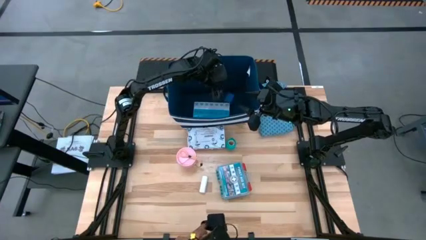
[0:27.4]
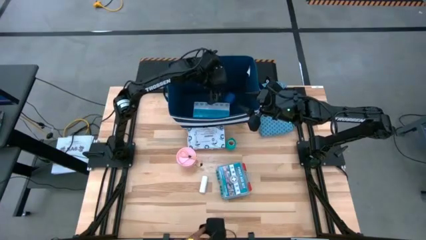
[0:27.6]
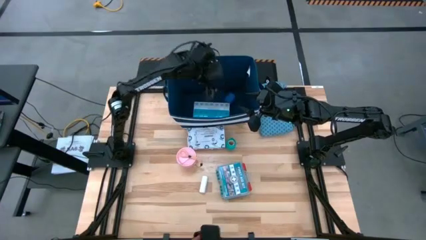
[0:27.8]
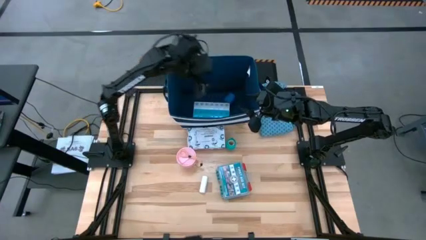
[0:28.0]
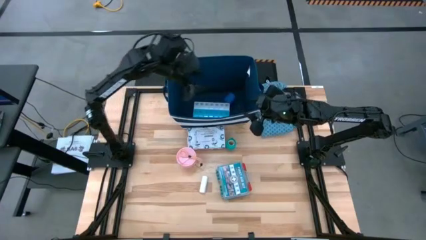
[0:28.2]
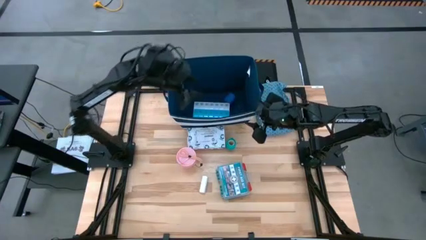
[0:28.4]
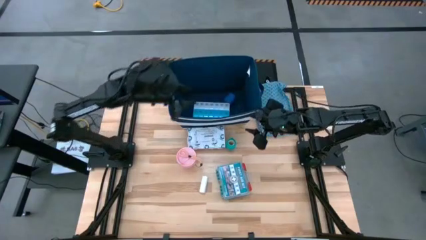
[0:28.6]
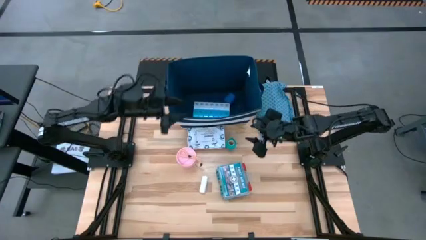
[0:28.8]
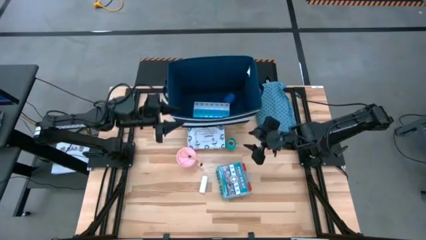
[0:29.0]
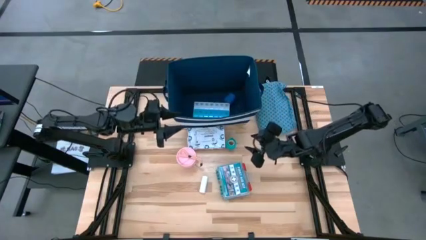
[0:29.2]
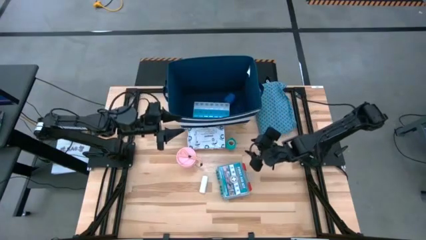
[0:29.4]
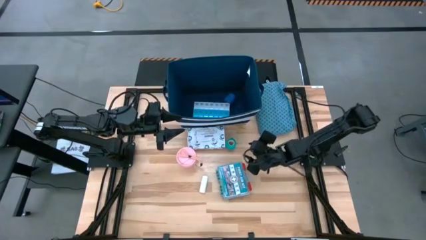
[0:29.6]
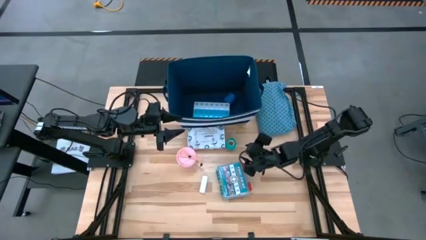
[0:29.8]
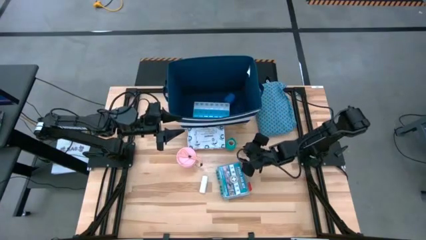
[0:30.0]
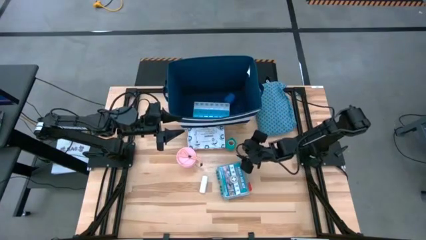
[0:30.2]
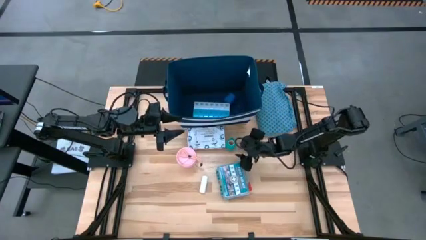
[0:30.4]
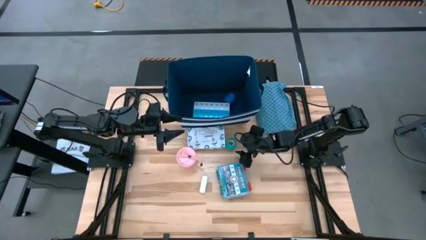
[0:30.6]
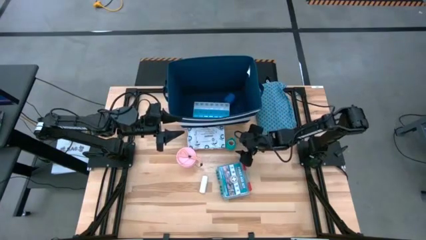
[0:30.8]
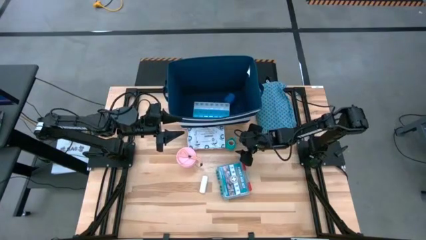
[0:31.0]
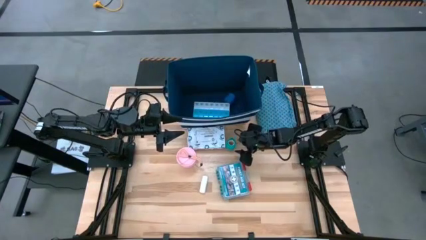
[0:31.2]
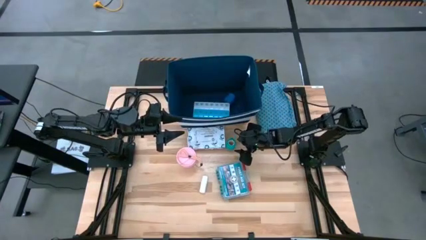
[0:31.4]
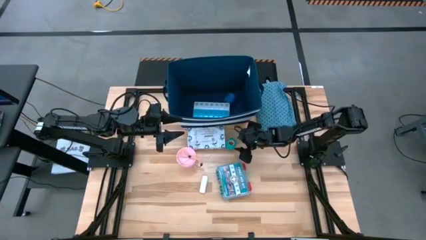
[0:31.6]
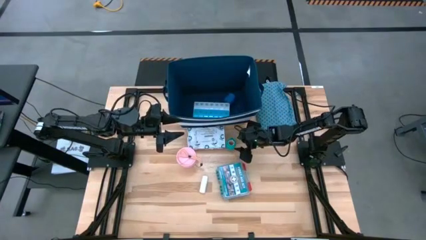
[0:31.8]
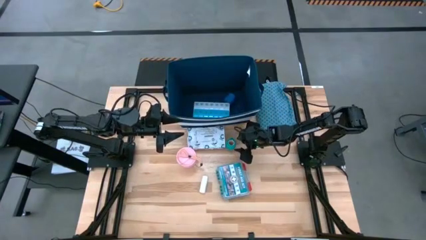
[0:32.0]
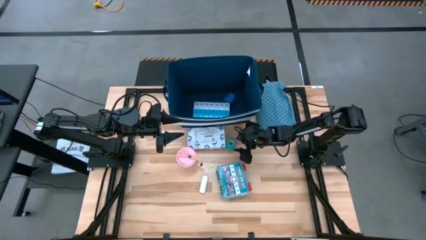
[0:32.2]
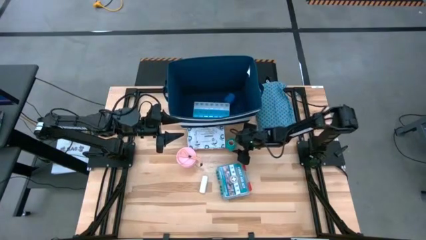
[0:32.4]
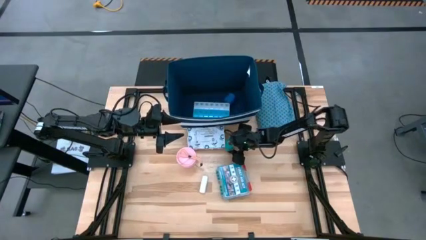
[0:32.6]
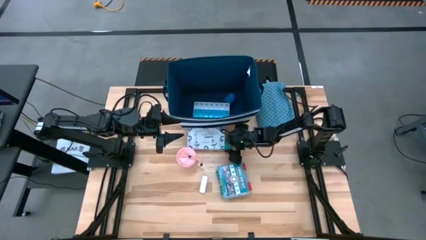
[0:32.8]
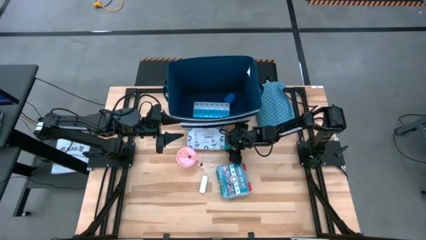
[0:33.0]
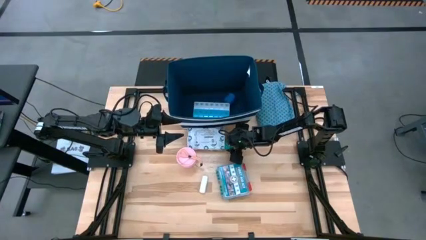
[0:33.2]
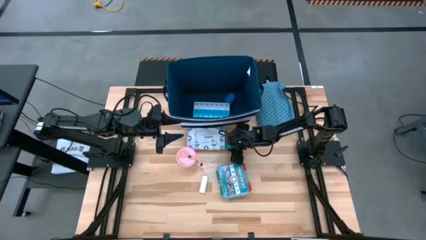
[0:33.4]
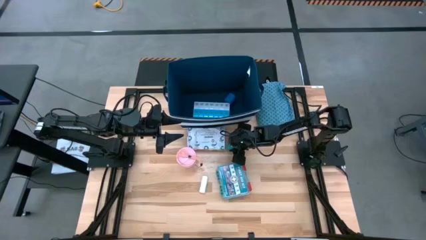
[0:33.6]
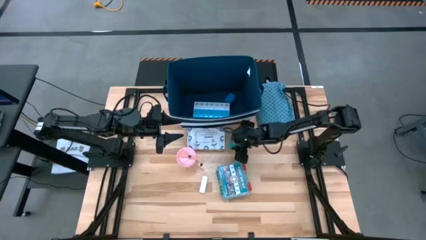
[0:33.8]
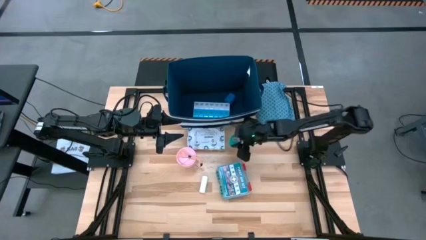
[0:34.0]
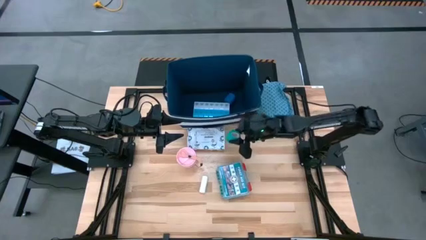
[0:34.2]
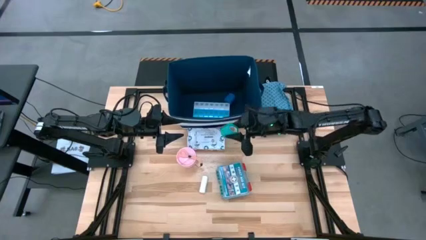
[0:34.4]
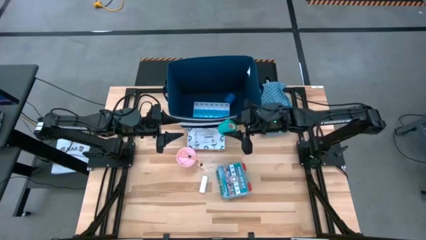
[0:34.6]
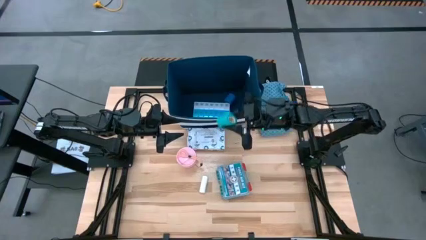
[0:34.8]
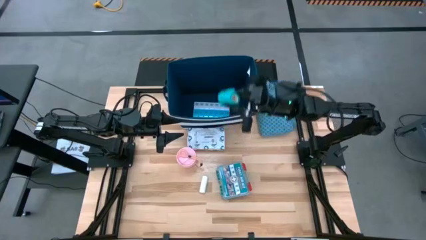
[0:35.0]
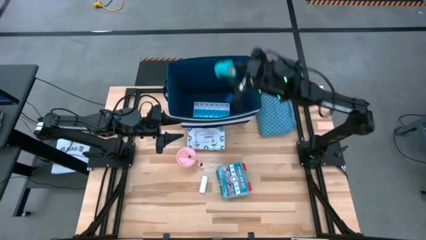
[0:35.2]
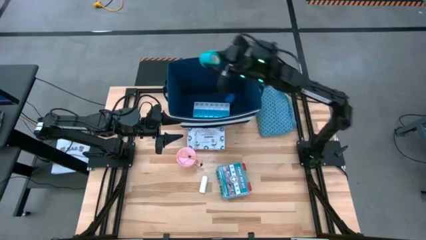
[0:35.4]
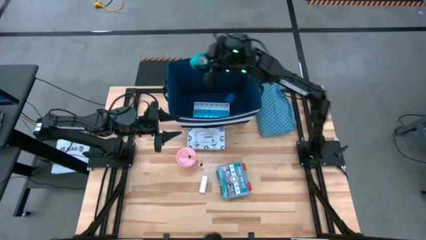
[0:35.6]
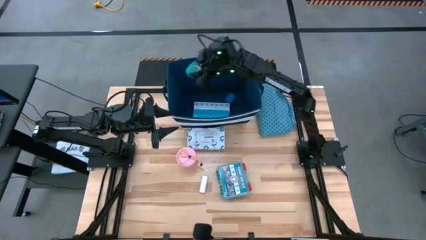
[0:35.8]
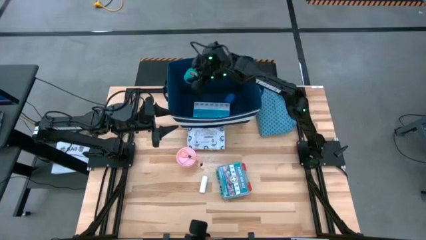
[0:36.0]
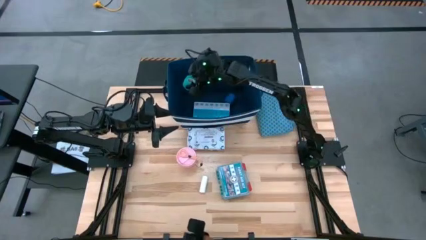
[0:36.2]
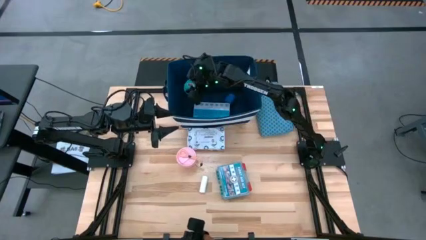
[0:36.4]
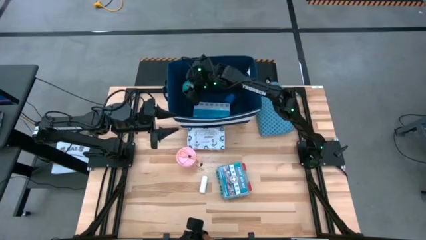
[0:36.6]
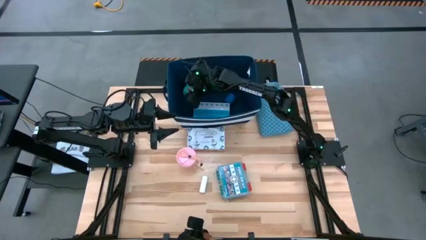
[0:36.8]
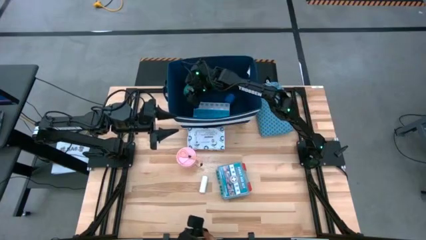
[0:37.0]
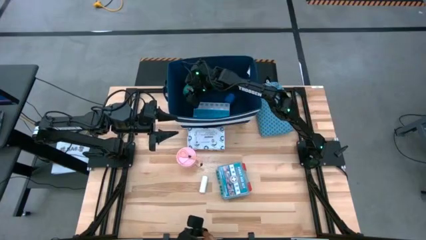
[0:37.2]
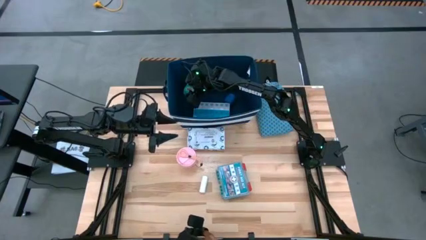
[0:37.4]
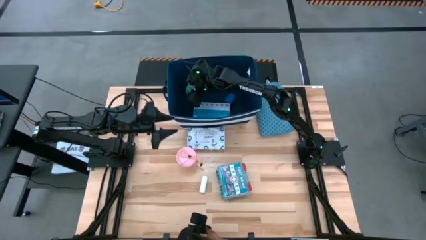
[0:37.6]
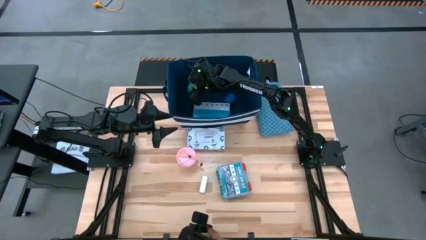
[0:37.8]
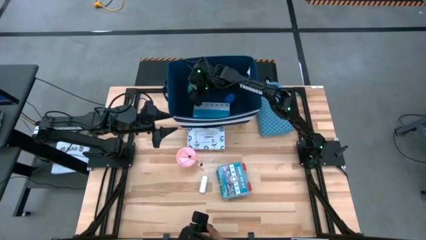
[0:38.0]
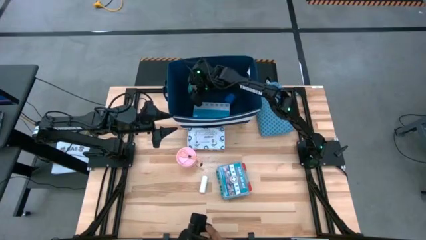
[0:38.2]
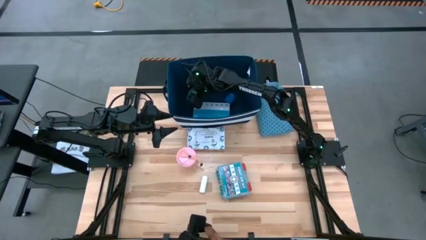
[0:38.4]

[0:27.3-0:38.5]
Task: Pick & place medical supplies in basket/bin
Put the green bandage into the blue bin

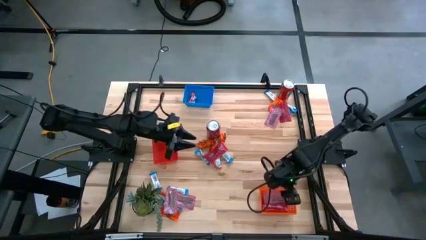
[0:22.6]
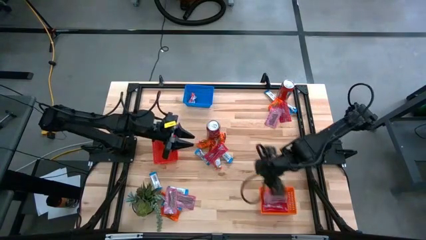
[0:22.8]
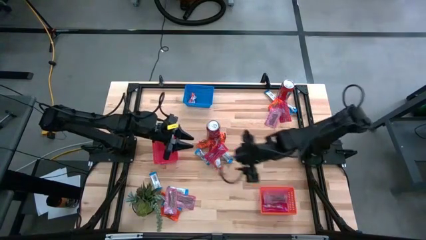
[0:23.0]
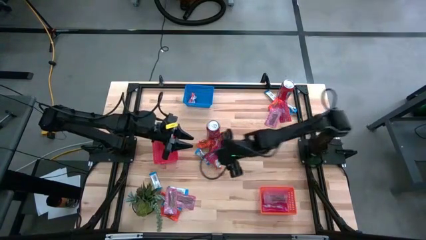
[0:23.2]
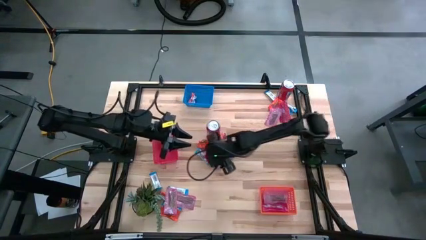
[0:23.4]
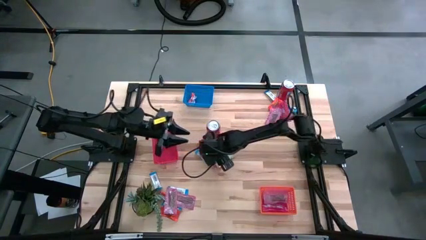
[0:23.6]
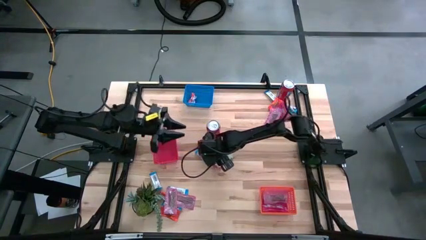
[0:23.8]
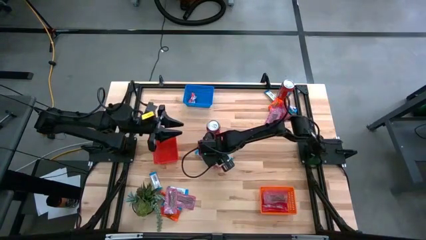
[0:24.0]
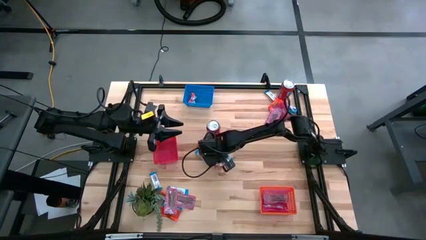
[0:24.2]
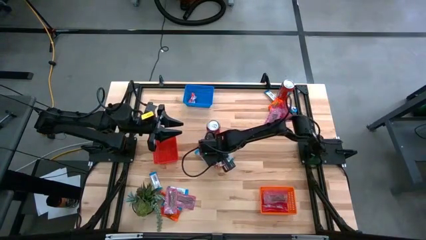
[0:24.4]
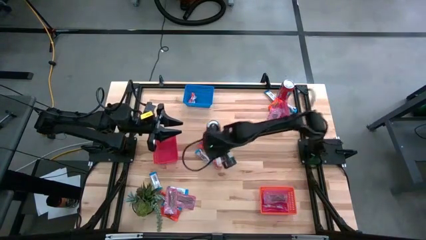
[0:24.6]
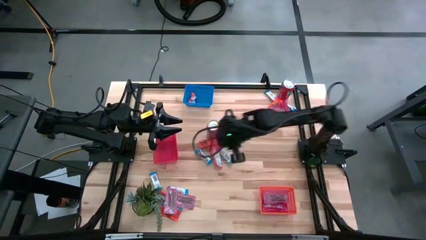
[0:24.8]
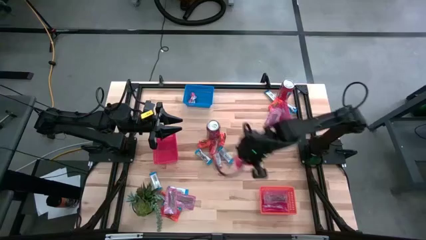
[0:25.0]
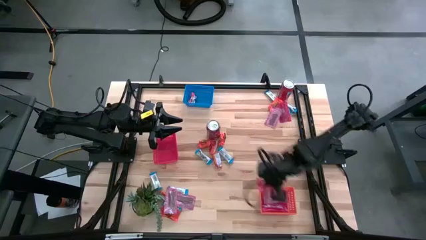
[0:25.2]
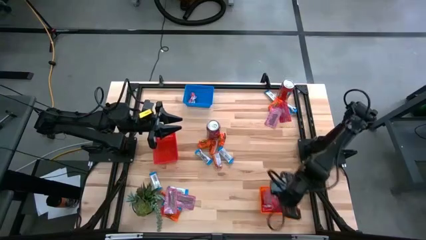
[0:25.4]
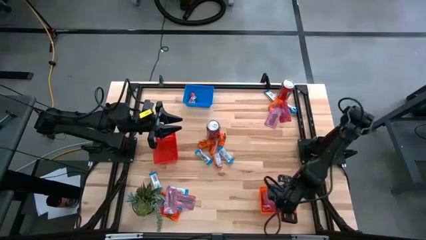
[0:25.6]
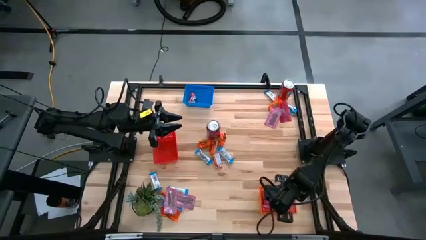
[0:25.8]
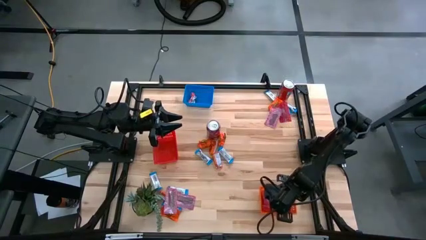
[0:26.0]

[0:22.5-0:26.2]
Task: Sort candy
Put the red candy into the orange bin

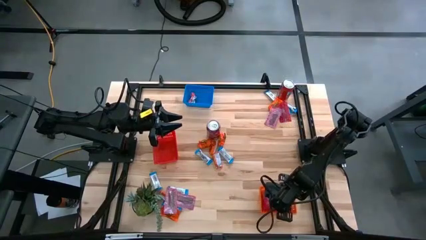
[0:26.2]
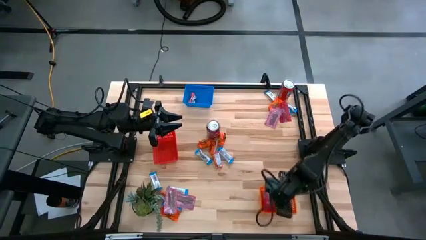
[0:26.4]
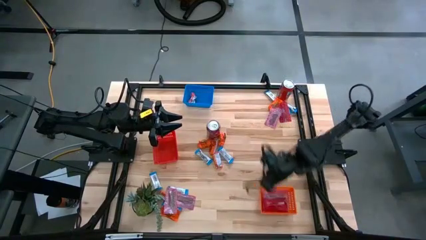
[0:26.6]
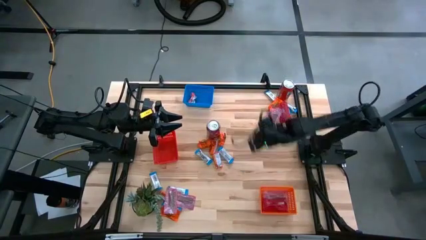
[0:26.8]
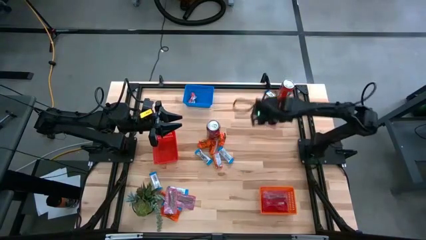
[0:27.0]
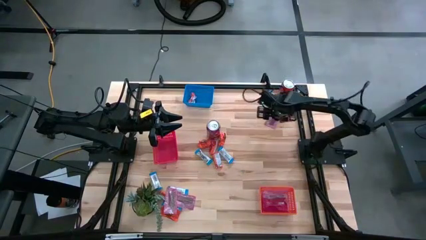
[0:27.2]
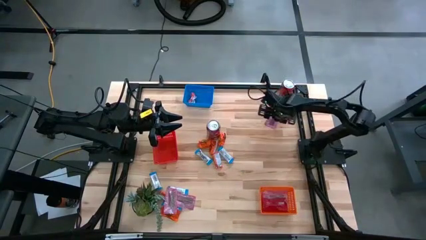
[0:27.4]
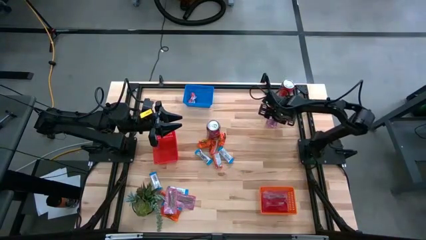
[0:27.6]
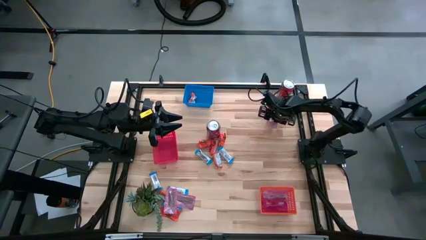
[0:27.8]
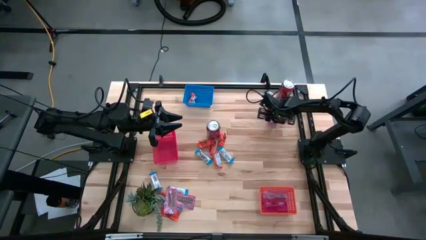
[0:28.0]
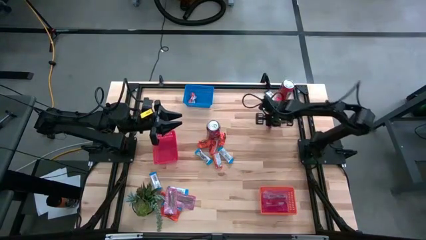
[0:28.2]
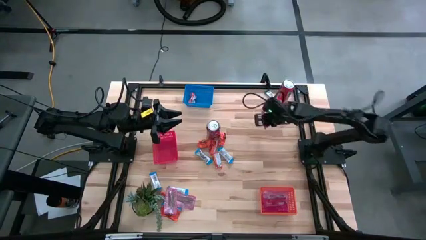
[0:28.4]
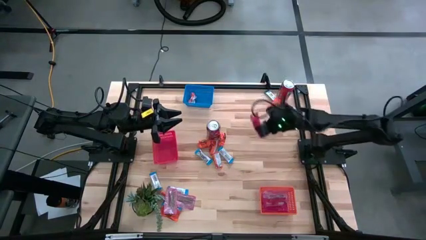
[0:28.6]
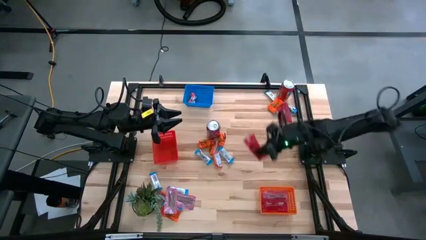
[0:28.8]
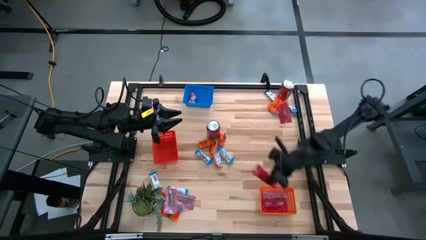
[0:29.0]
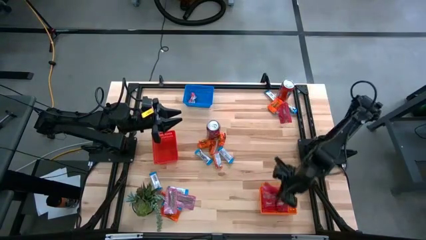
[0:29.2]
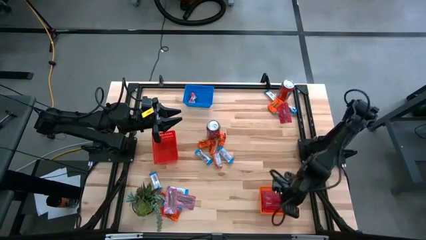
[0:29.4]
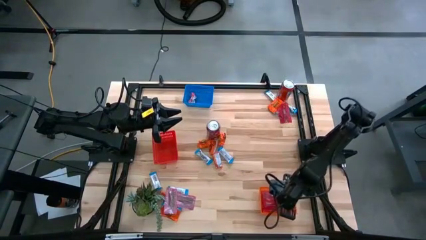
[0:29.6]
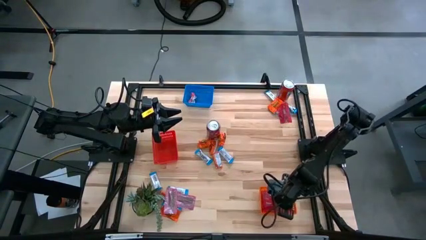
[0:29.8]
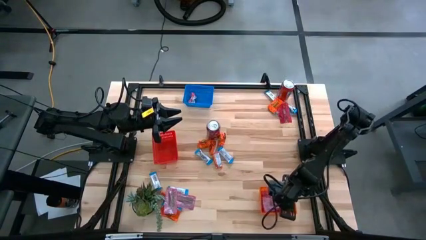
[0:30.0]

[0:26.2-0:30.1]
Put the red candy into the orange bin
